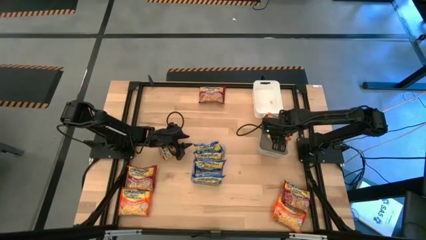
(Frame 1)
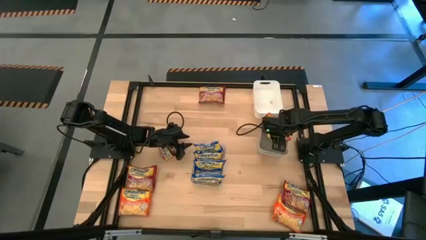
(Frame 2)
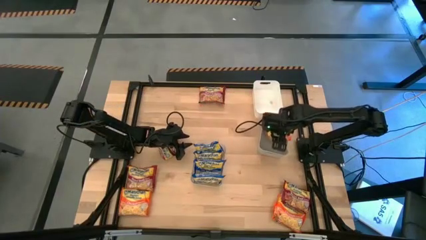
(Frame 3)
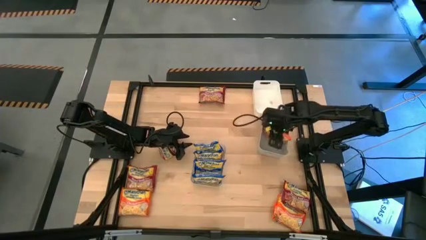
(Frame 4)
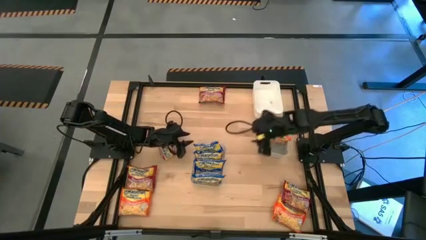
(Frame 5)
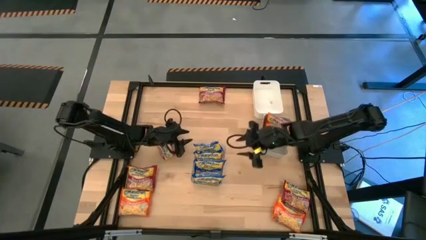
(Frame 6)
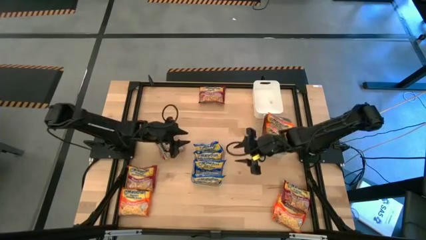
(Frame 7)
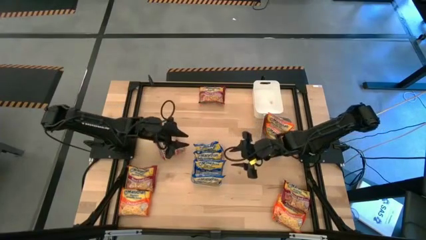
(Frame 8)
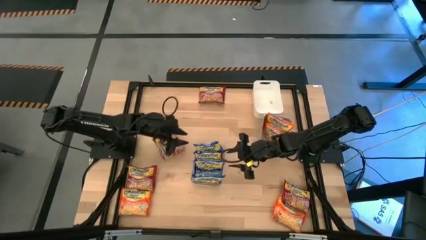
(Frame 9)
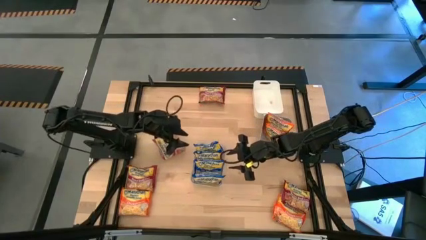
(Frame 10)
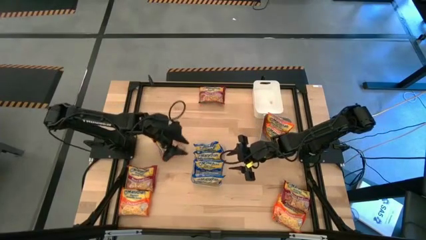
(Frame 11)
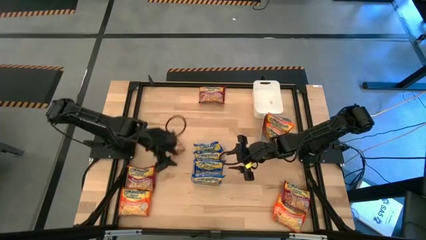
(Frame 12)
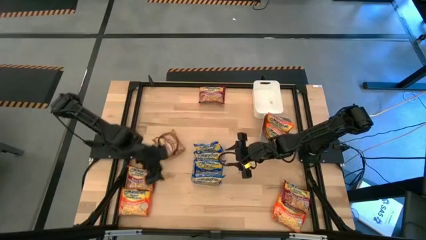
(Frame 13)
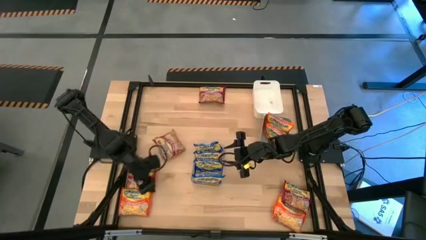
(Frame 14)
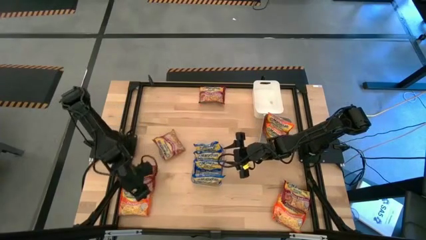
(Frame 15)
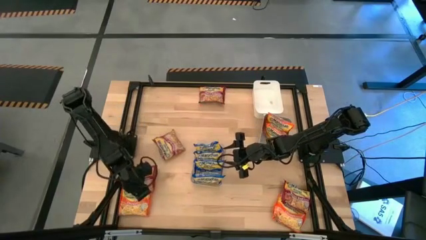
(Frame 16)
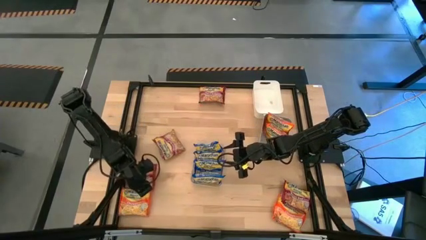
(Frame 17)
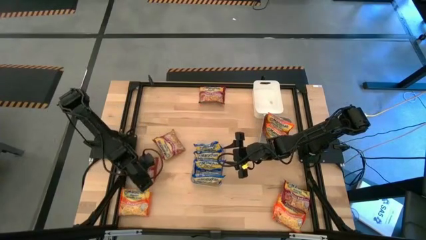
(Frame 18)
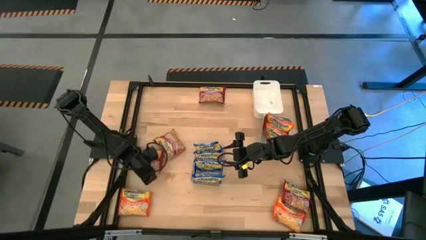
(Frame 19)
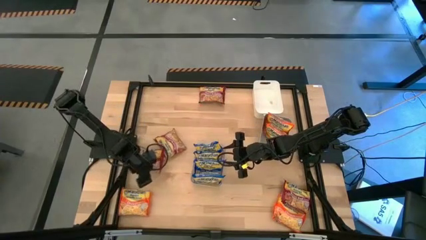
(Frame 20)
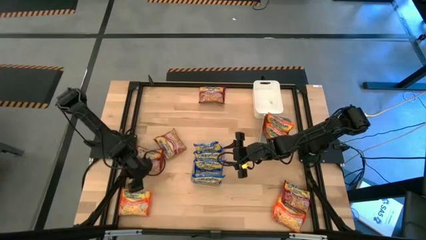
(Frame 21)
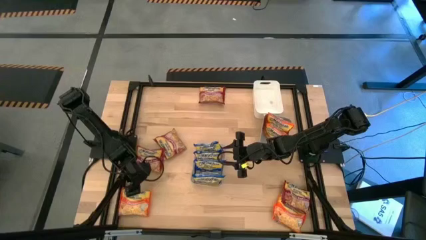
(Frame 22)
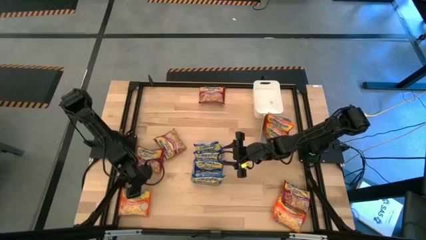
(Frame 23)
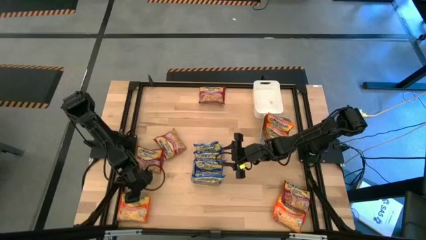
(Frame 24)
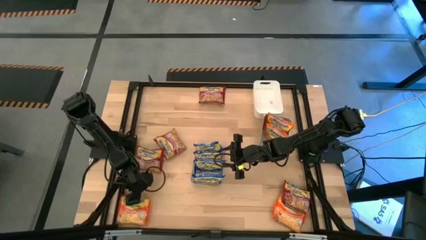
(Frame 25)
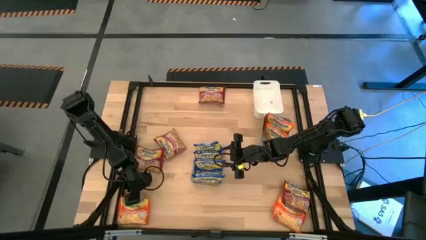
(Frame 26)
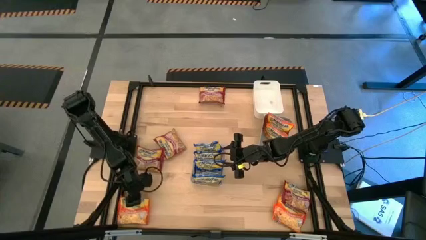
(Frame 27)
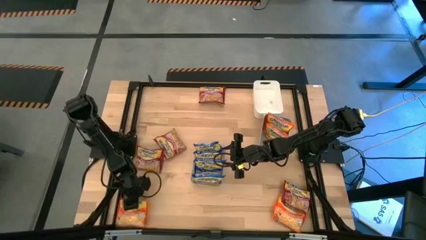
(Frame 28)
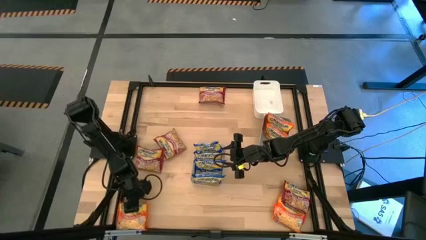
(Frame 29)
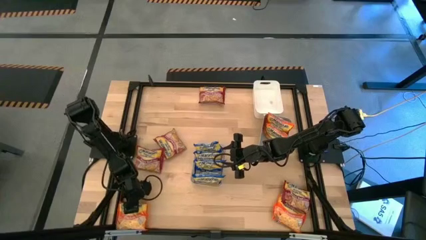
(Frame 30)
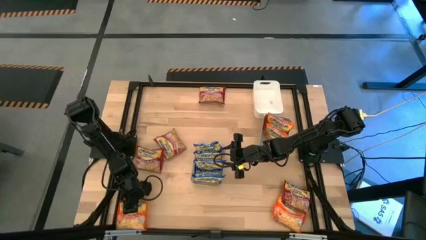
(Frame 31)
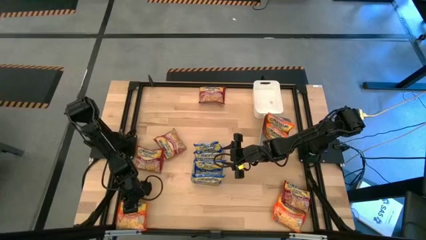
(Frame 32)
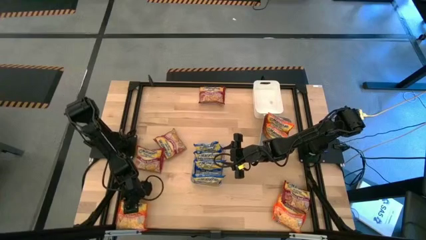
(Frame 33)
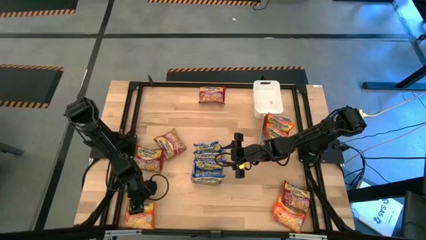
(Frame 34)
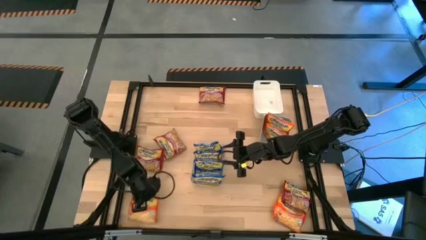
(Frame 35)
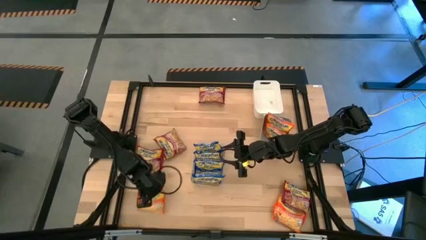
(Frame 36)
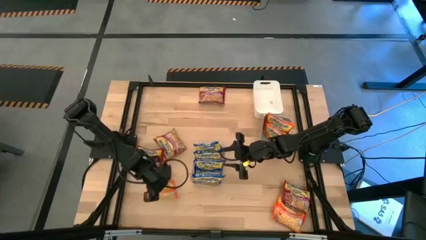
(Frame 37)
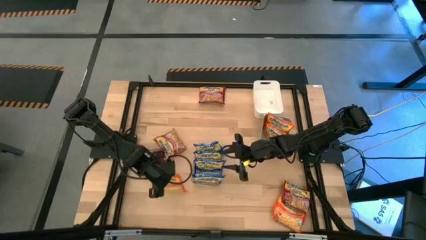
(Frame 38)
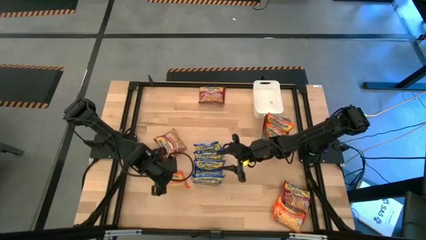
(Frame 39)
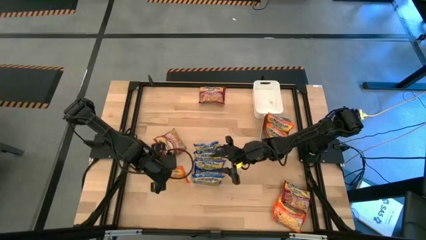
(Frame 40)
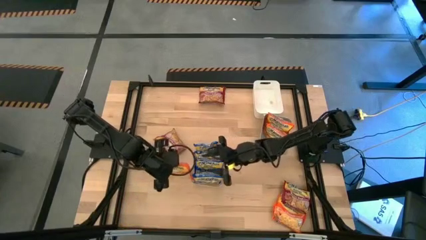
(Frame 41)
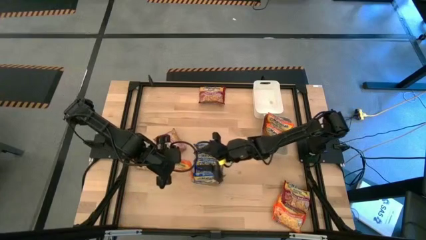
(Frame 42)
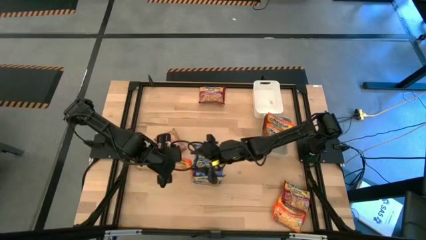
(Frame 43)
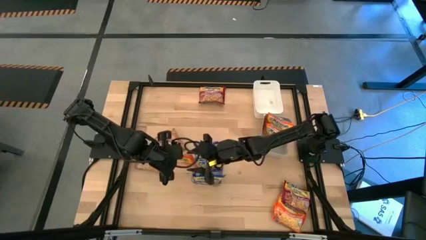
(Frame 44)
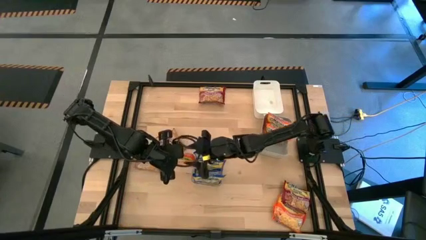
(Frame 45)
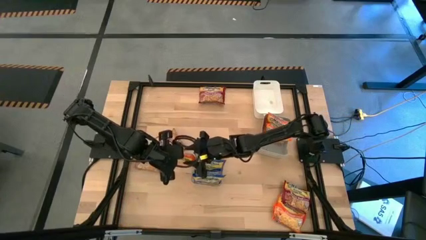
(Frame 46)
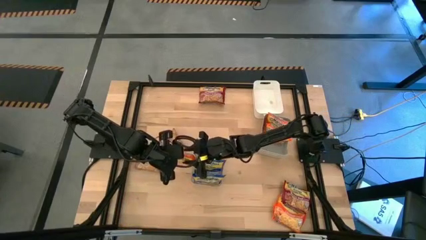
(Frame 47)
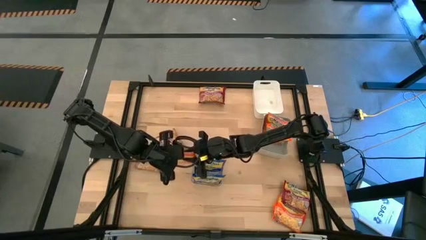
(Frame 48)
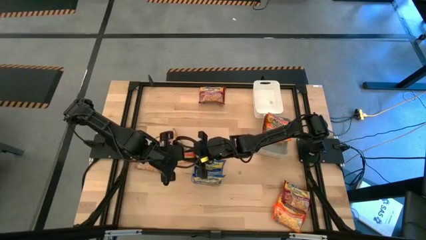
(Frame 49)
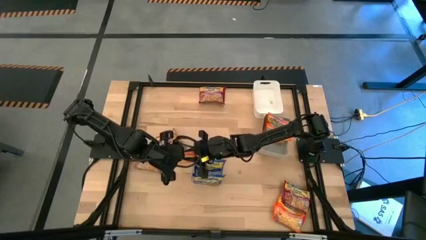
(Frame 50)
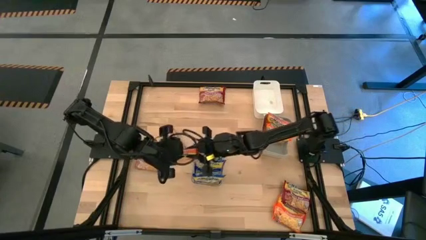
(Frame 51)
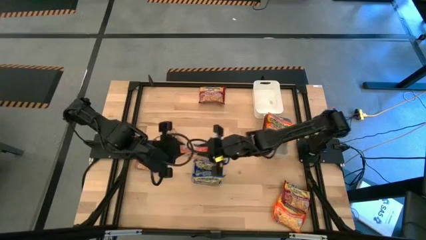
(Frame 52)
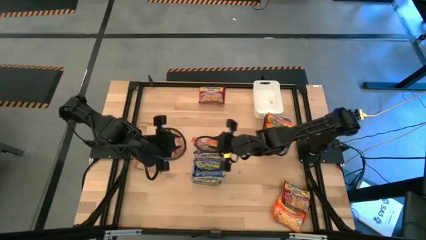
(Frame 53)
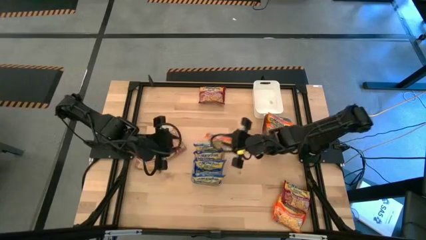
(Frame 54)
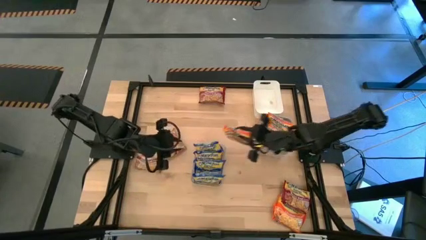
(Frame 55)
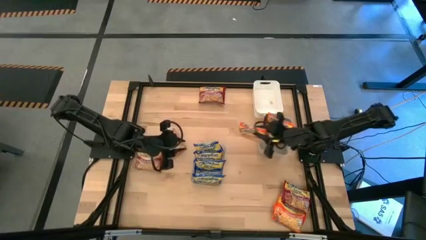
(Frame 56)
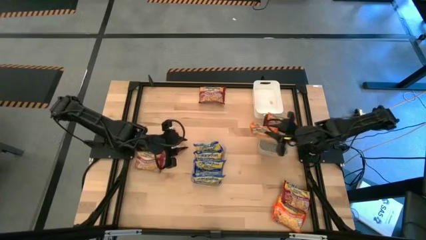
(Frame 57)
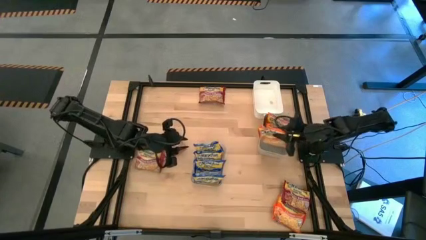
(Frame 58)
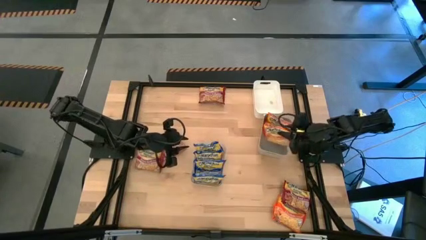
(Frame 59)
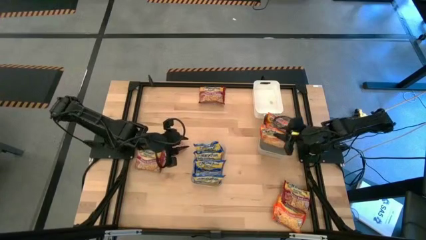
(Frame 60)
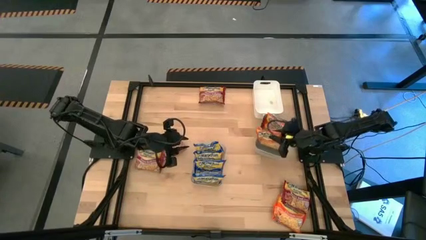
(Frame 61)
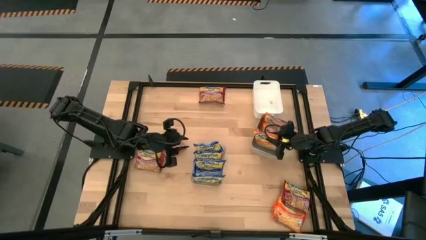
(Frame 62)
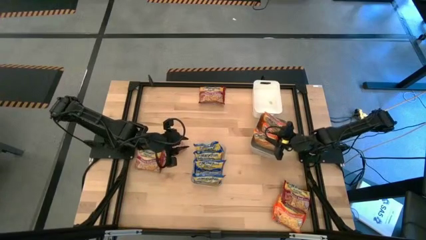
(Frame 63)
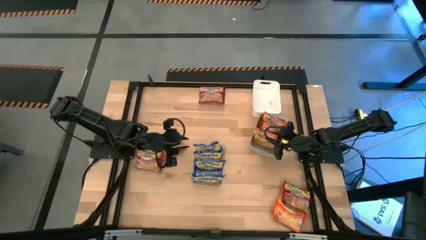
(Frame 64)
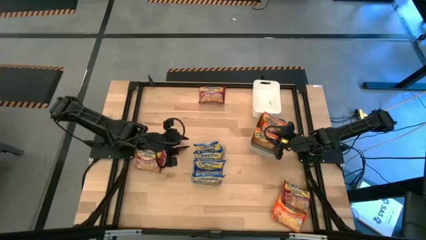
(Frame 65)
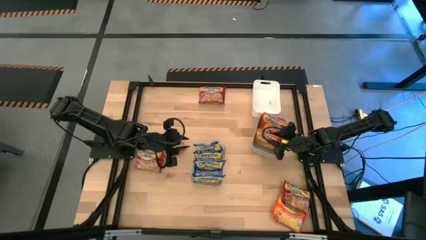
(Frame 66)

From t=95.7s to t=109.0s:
Task: Sort Maruchan noodles
Put the left orange noodle pack into the gray bin
